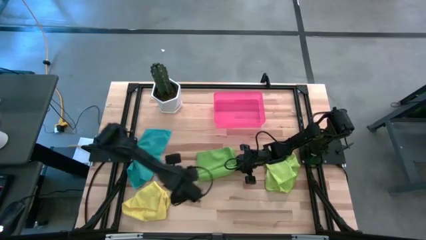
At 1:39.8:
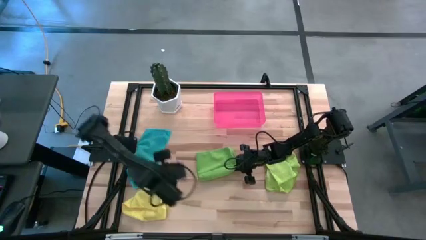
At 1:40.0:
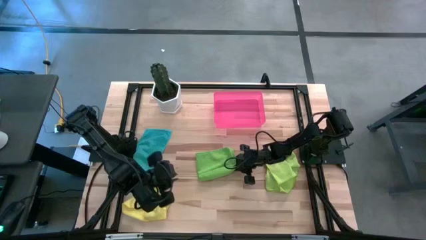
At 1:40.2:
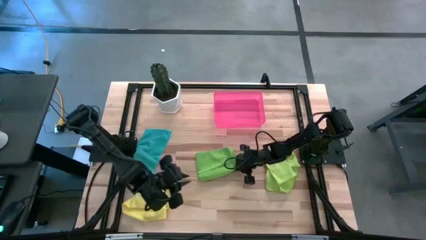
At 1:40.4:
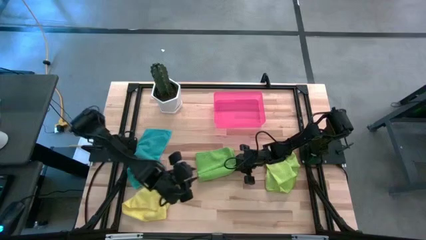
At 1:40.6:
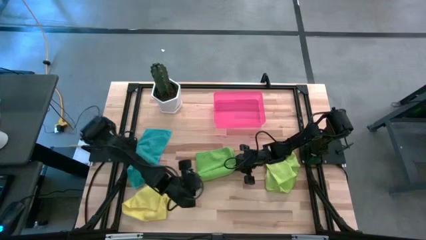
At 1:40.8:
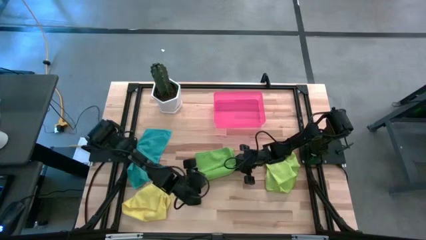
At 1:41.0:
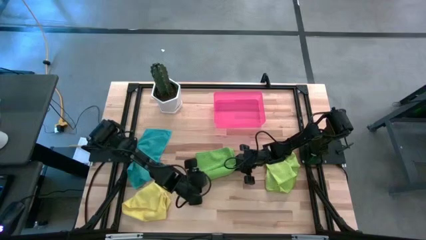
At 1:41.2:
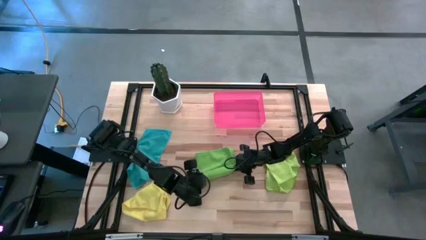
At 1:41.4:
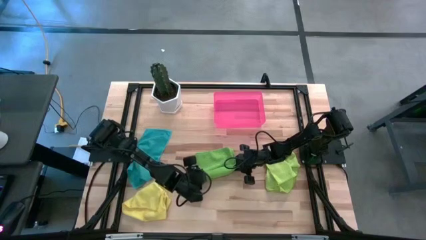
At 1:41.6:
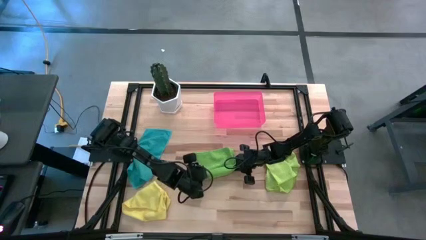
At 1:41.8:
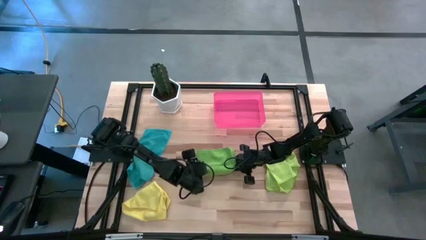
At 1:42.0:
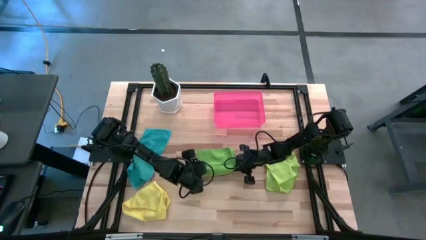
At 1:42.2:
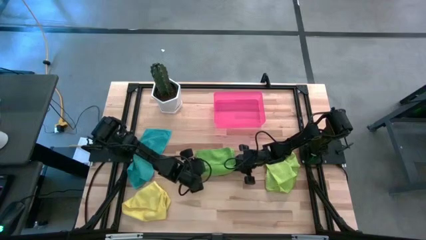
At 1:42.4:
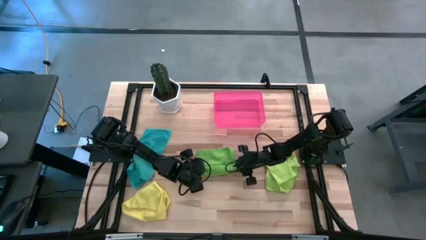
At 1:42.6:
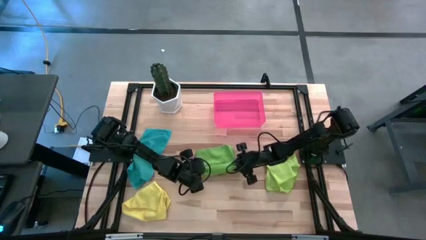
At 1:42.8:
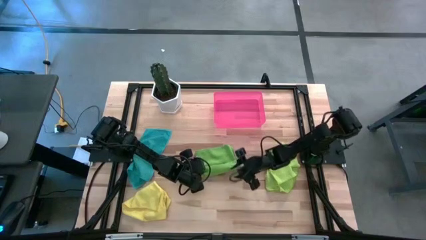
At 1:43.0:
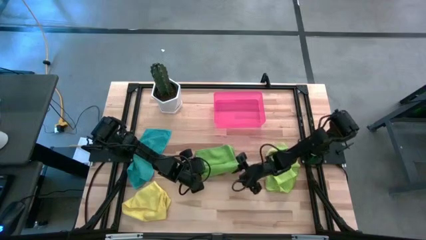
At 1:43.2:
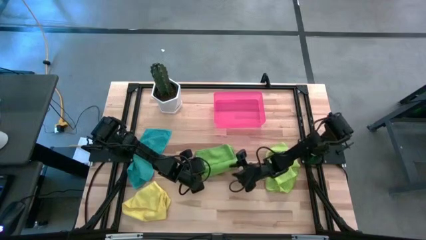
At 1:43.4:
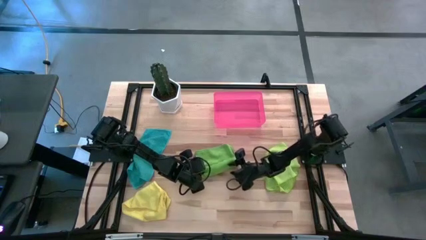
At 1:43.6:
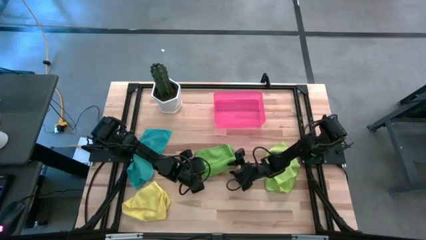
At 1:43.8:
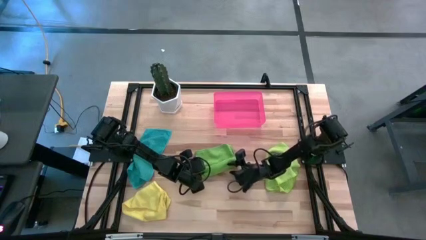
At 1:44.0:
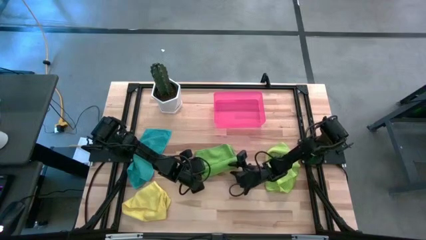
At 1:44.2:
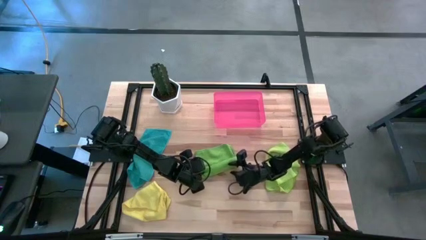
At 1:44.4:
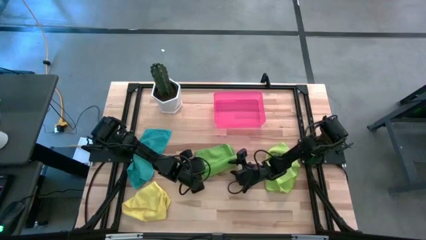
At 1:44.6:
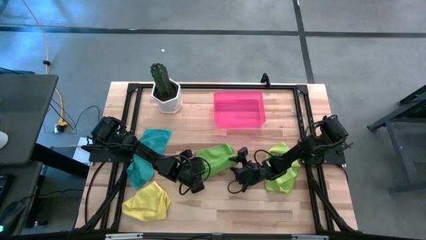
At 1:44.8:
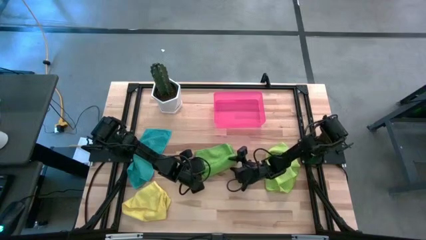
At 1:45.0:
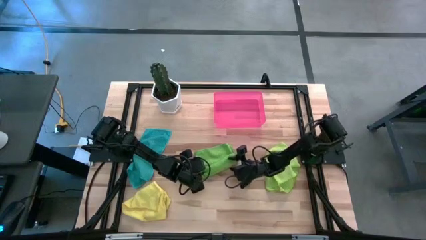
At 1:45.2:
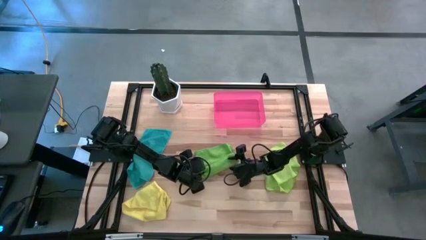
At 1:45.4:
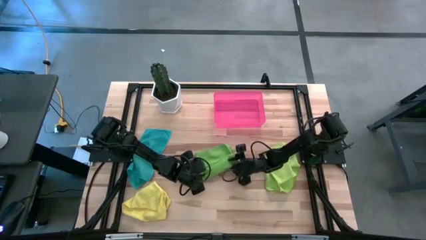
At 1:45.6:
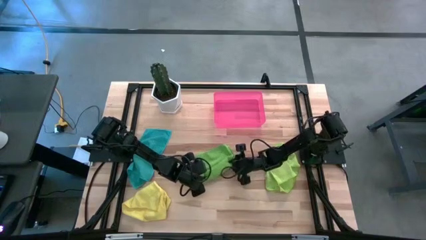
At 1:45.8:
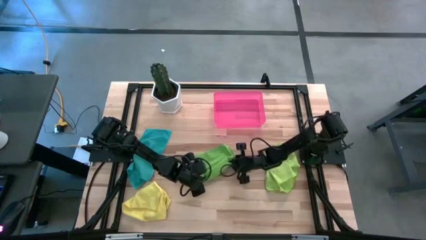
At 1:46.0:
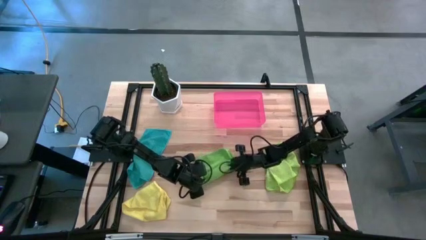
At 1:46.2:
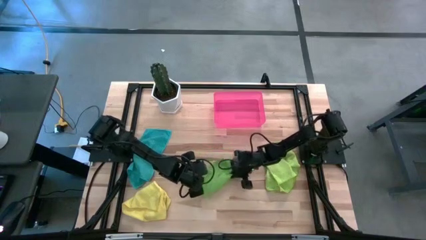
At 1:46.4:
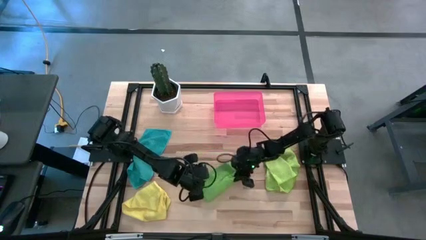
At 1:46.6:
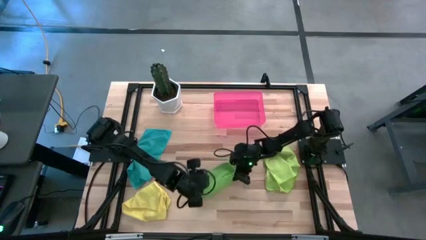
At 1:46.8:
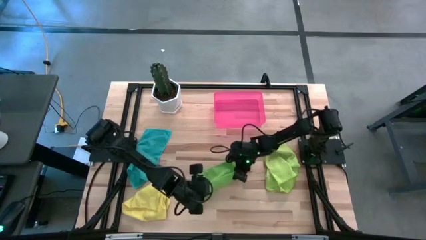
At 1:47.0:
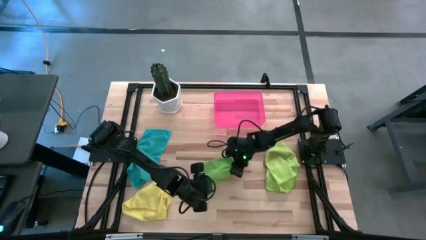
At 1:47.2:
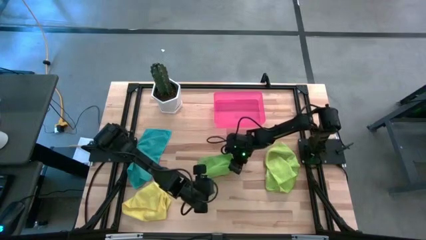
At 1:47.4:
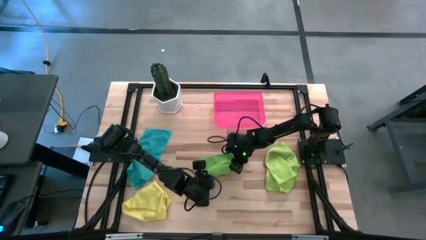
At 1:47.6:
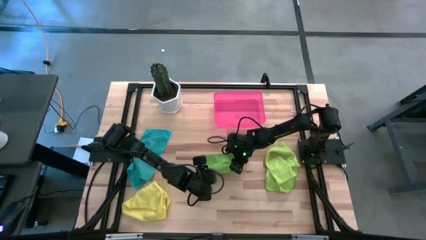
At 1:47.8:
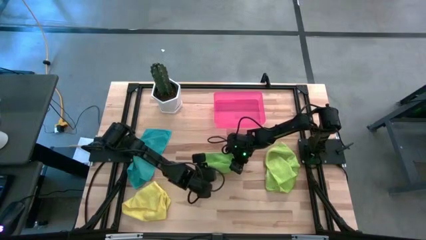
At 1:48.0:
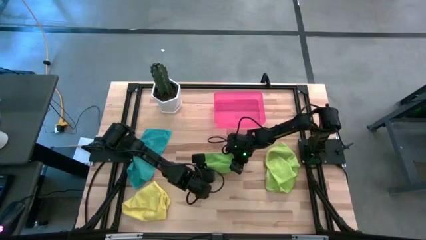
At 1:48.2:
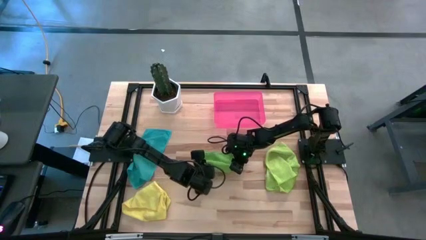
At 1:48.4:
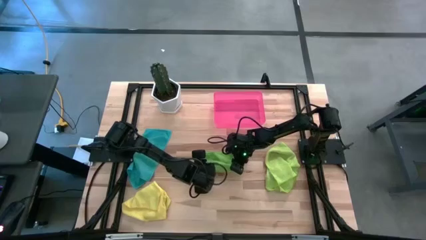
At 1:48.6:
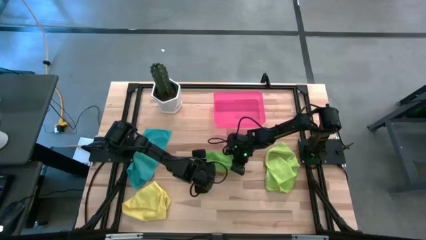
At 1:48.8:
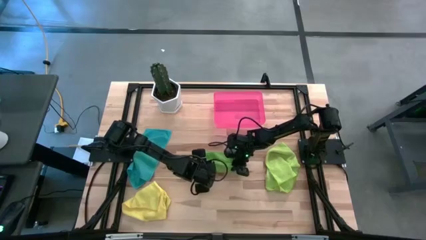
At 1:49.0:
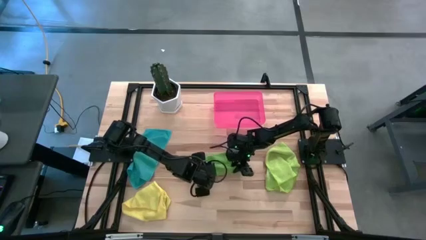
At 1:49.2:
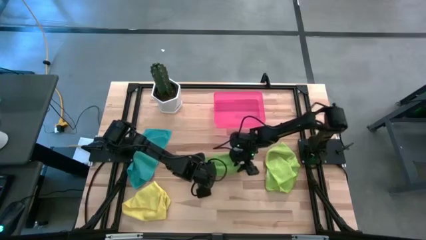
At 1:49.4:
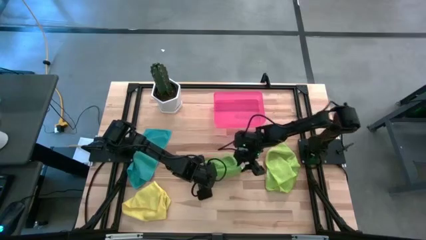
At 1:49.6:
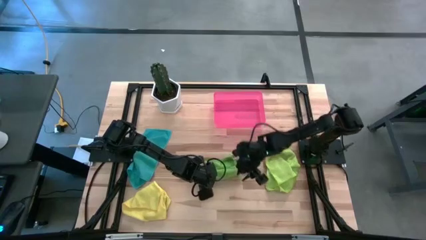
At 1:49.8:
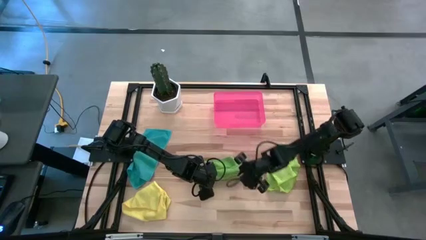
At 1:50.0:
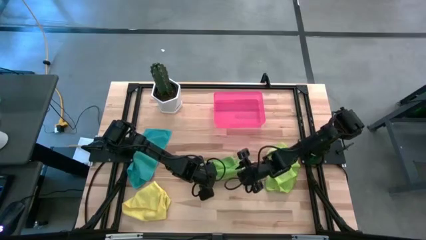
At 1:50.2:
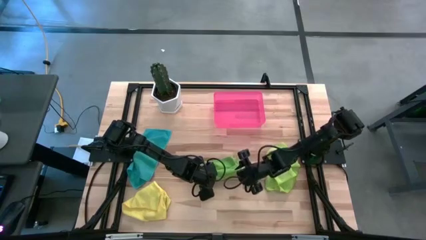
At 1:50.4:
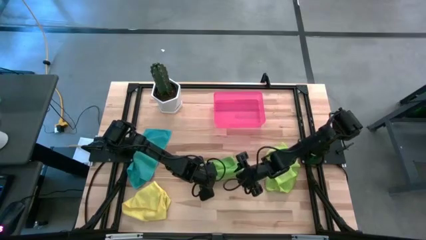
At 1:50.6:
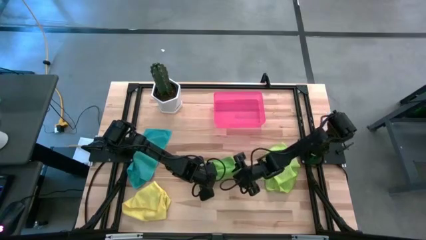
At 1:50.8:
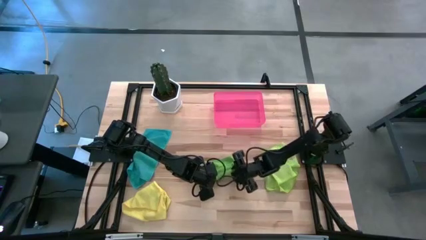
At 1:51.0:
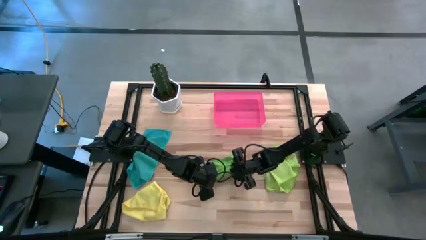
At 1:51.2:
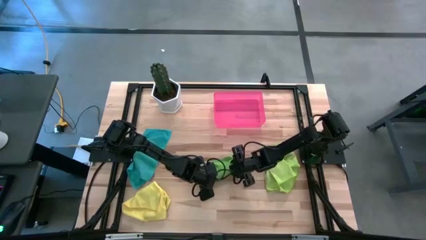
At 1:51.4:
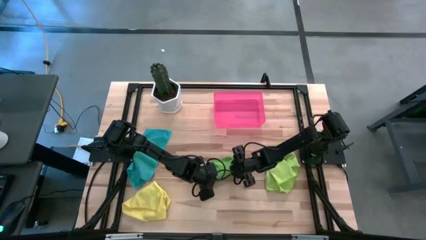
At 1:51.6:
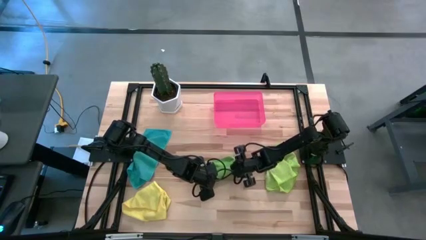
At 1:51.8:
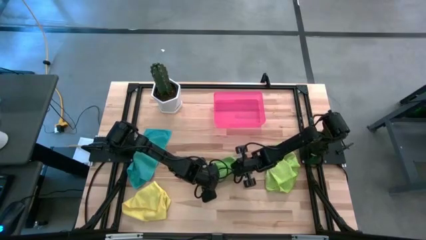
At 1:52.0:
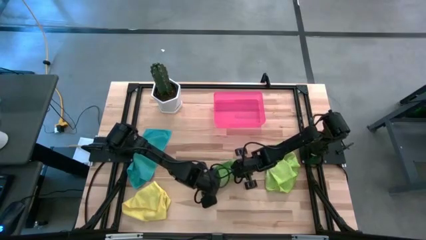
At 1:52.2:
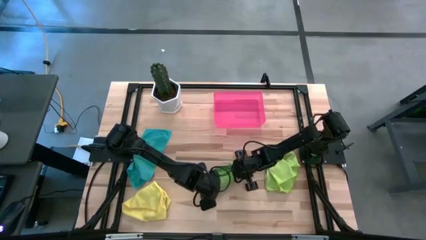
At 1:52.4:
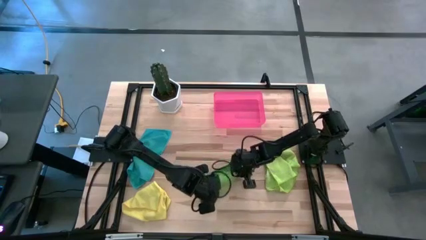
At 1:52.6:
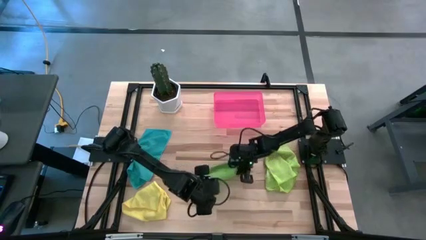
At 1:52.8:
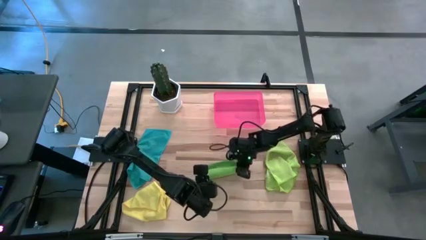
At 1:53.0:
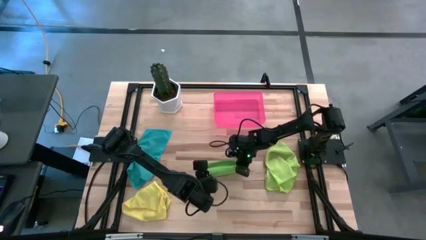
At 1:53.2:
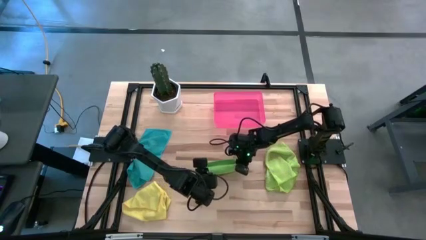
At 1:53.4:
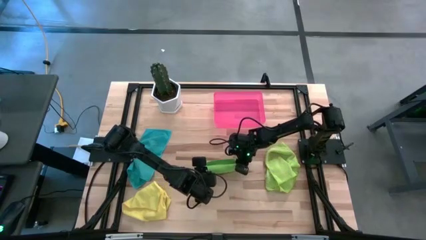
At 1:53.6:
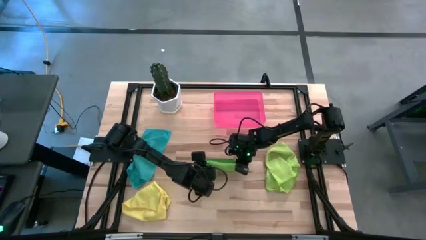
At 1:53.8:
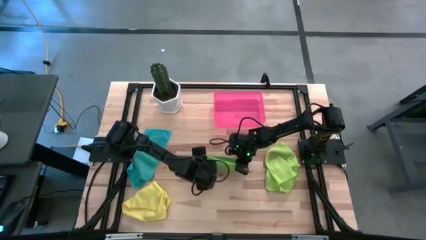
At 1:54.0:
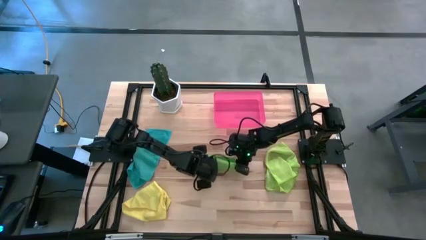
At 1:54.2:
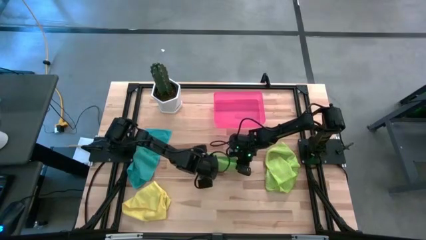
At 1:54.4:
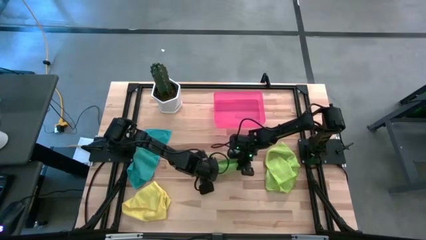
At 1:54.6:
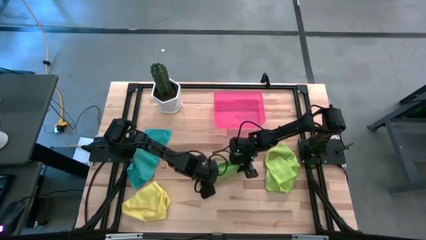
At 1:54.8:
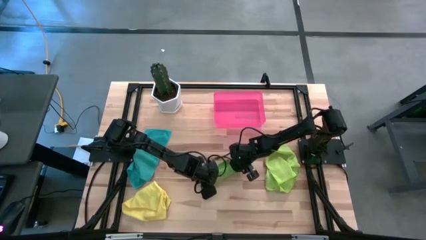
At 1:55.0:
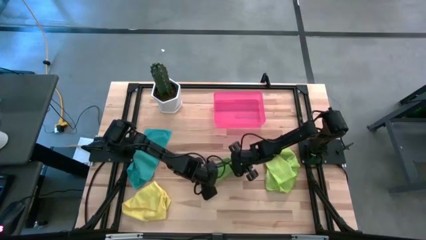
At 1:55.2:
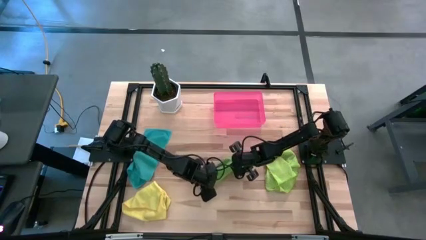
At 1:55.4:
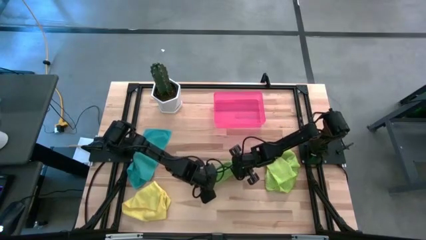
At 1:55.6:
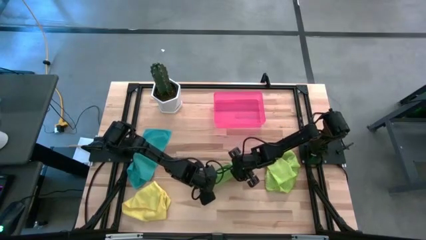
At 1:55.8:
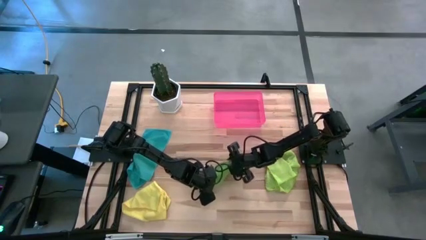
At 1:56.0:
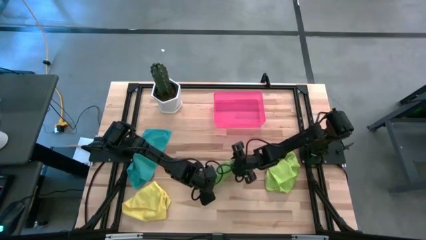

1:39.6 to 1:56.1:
Task: Roll microfiber towels into tight, uniform cylinder then place into a basket
Roll the green microfiber cloth
